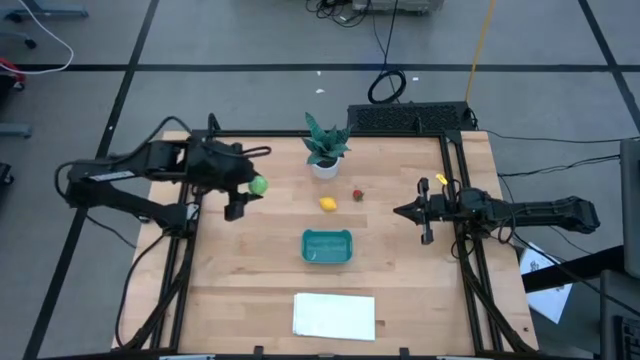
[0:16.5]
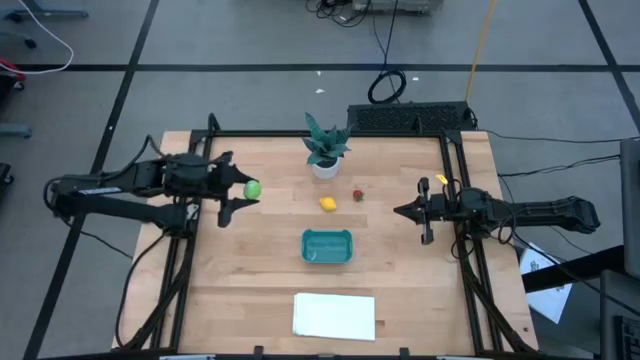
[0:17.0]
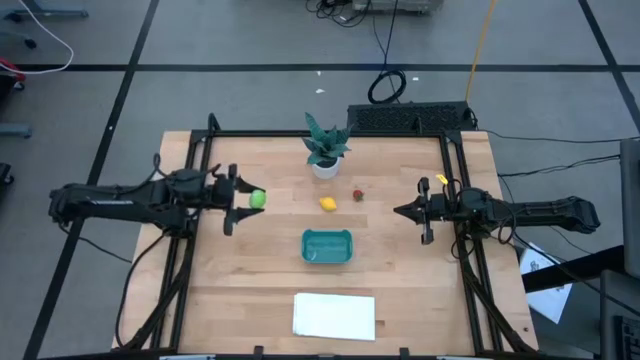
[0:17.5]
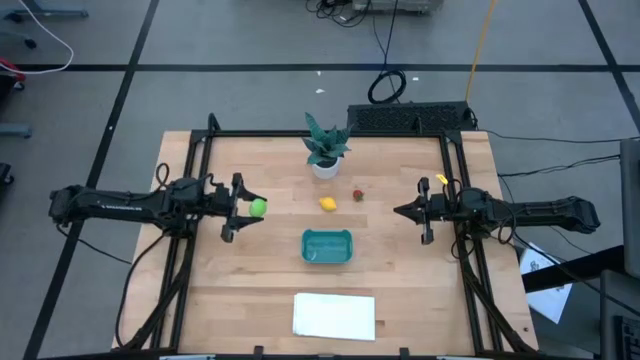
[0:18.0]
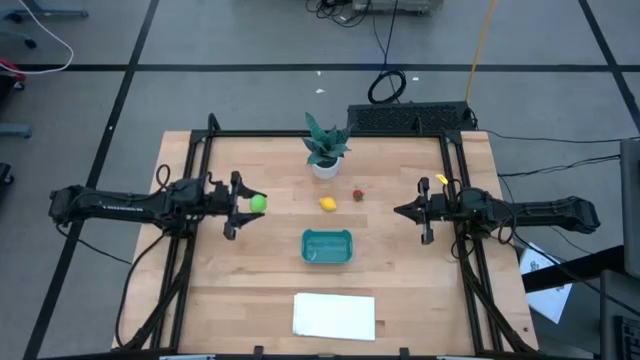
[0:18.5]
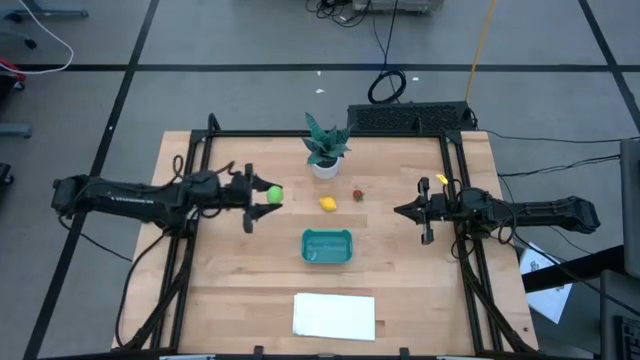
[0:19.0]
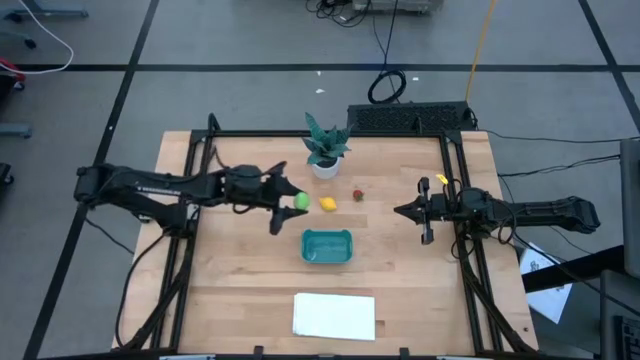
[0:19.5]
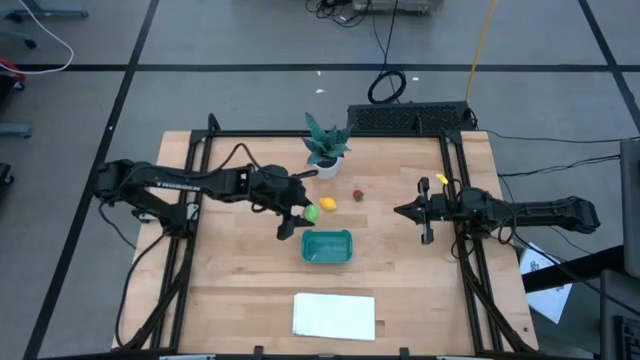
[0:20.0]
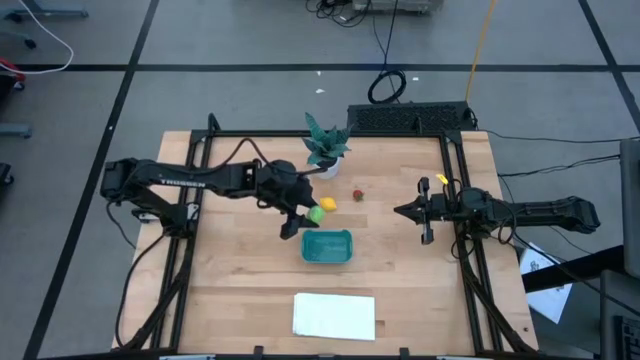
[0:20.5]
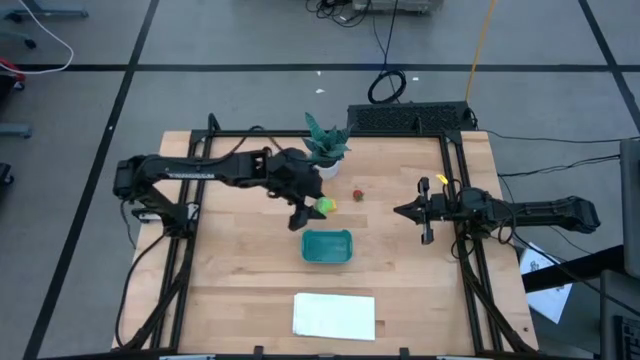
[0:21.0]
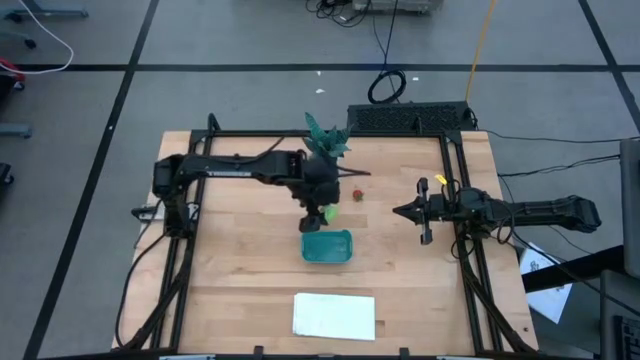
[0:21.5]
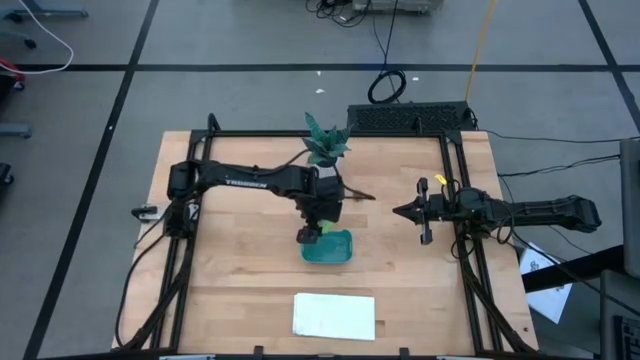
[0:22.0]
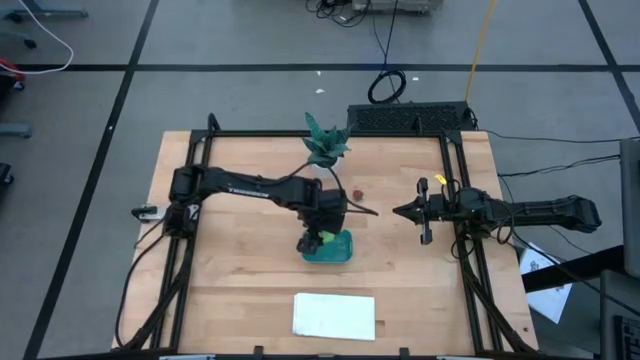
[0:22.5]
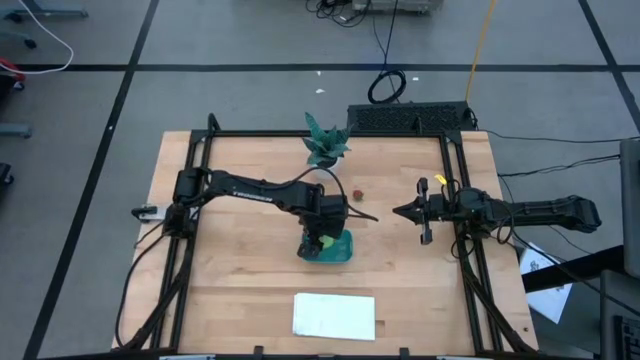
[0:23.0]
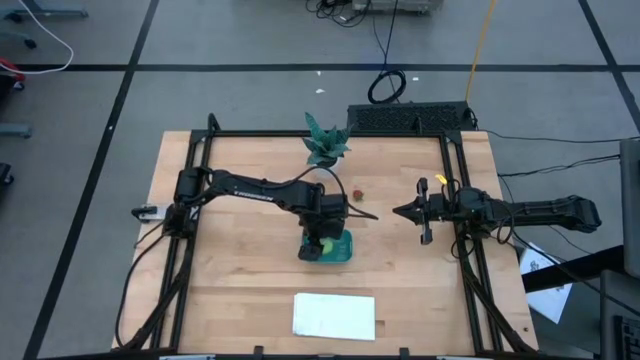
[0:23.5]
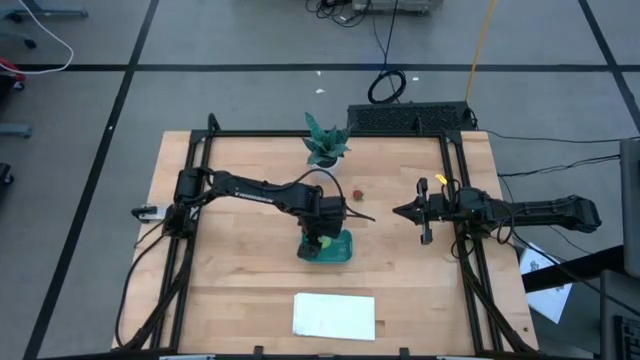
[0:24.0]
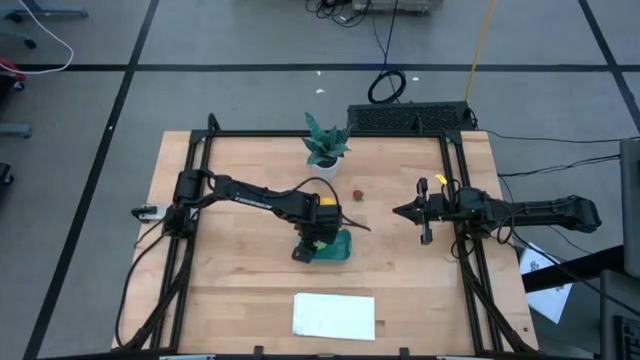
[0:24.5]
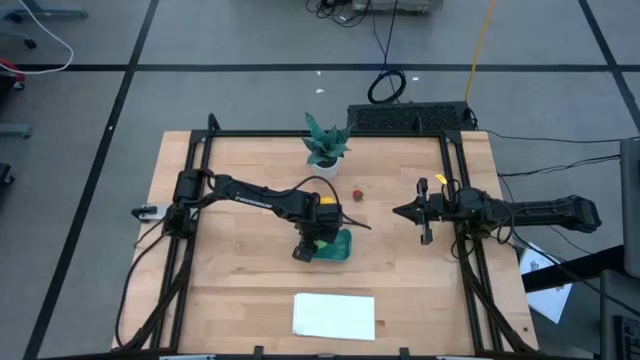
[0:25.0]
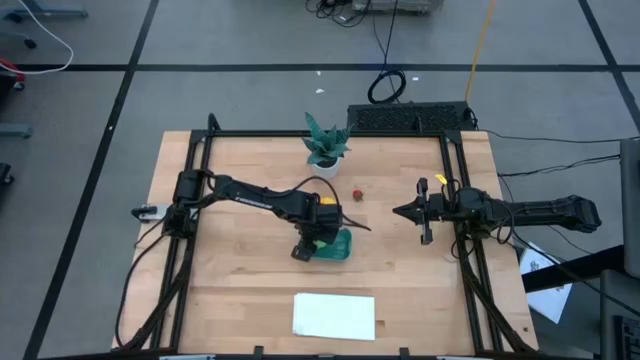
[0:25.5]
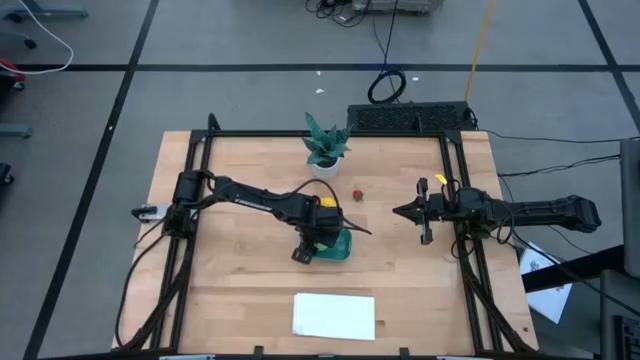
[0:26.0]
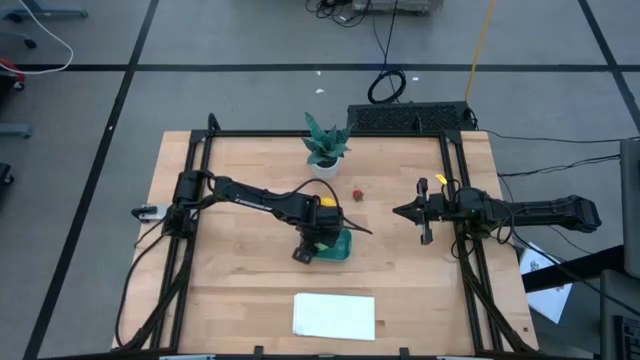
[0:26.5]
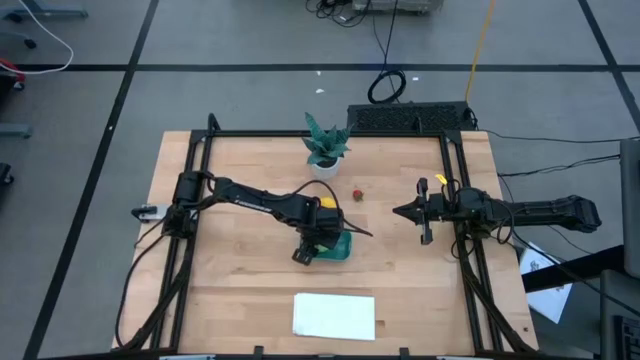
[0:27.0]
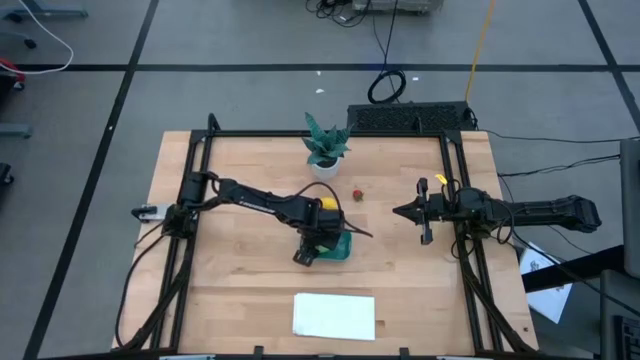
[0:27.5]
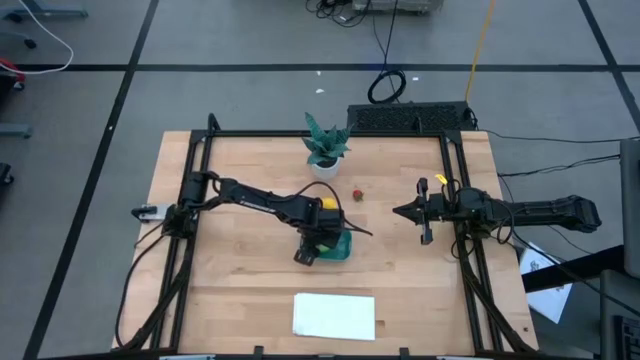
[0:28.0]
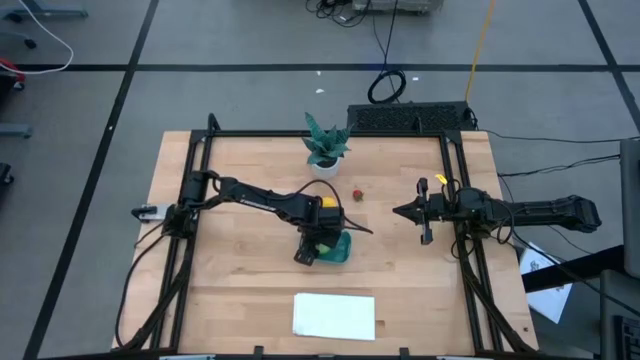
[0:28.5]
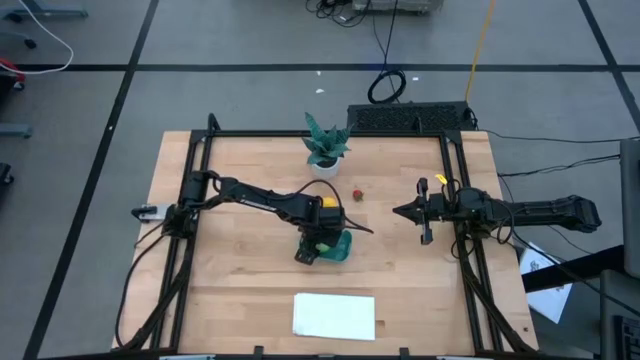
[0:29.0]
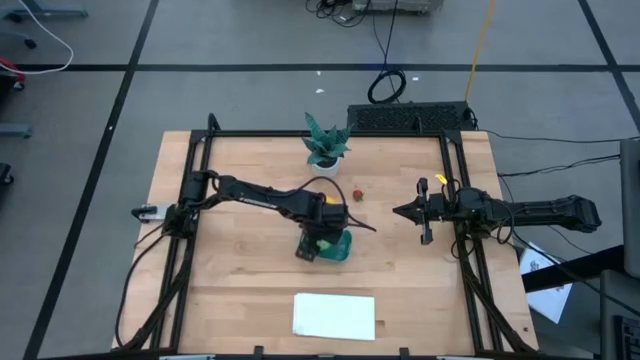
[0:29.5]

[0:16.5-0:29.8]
Task: Pick and placing Produce into tupperware
Put the green cabbage into the green bin
